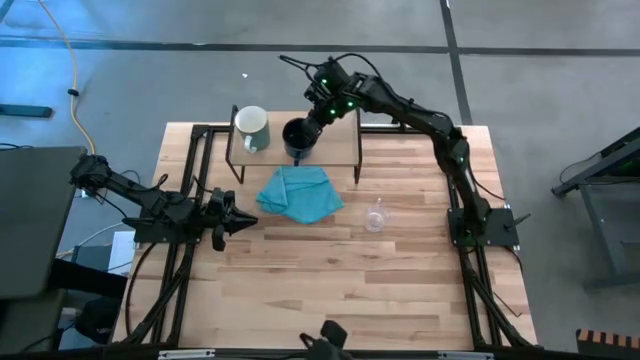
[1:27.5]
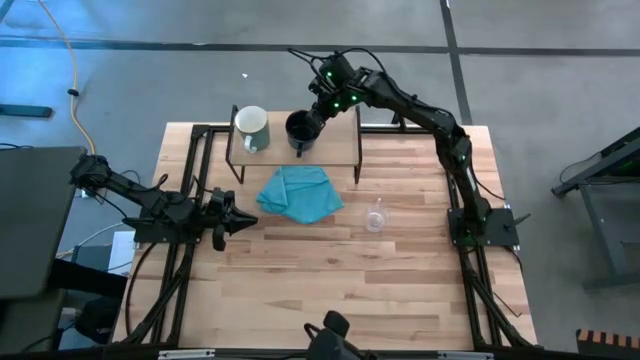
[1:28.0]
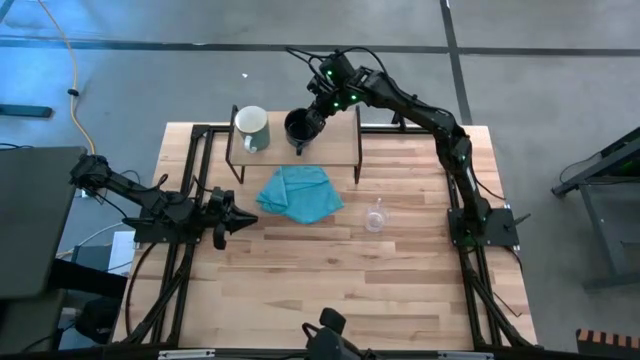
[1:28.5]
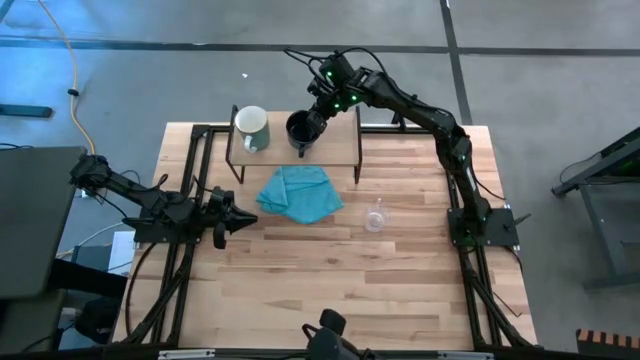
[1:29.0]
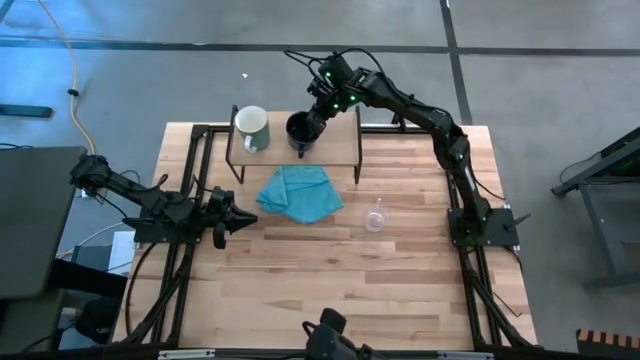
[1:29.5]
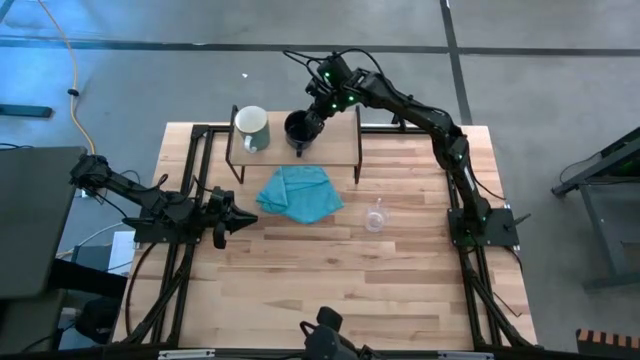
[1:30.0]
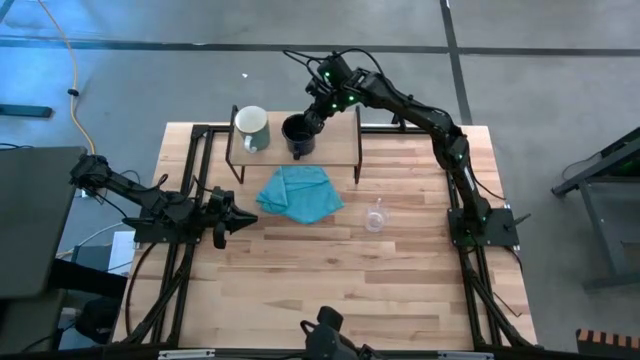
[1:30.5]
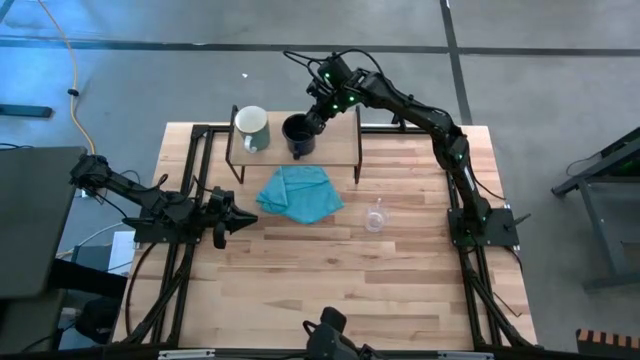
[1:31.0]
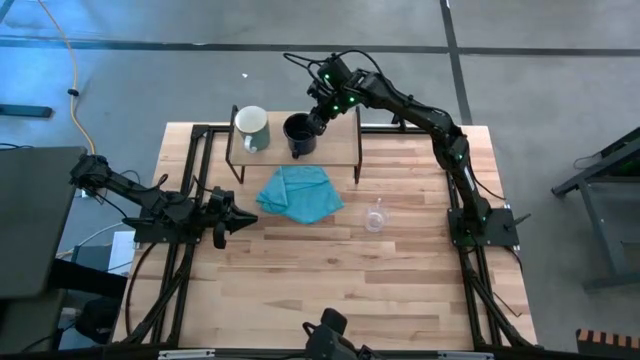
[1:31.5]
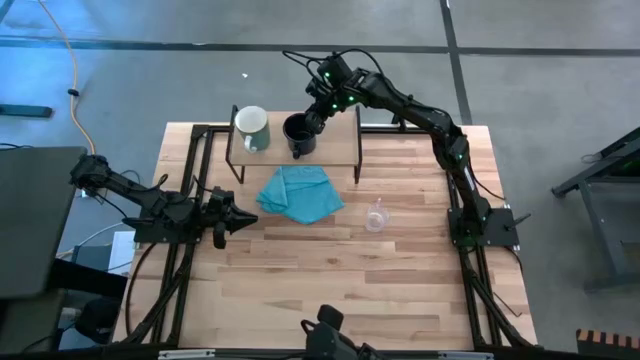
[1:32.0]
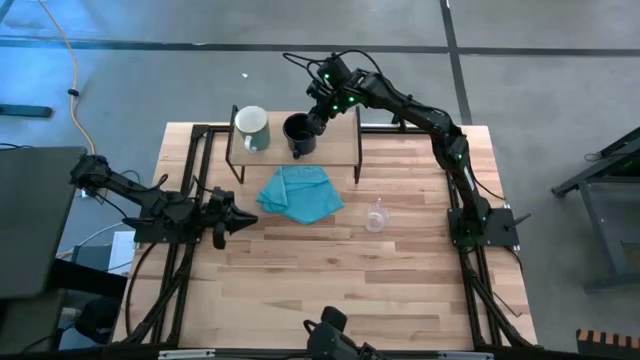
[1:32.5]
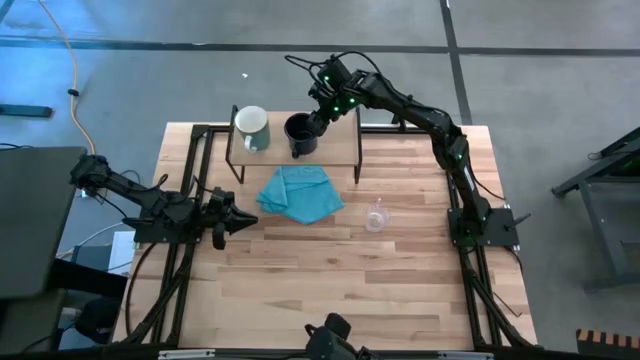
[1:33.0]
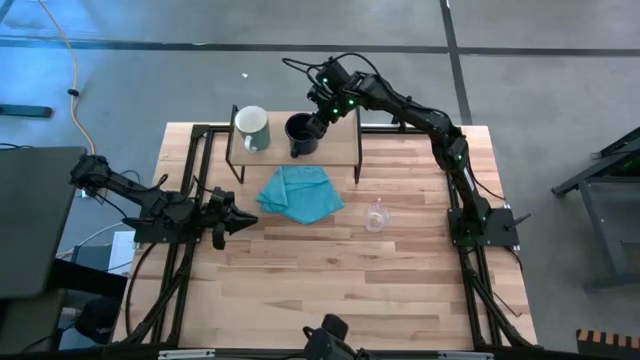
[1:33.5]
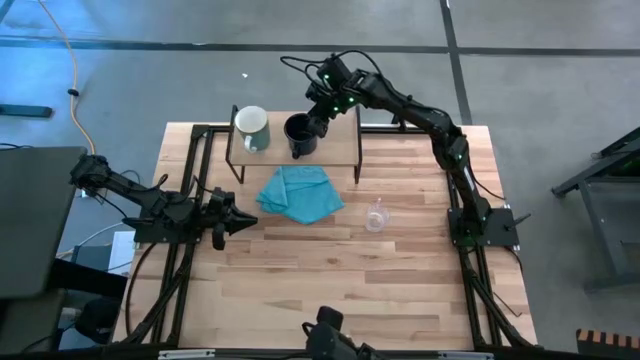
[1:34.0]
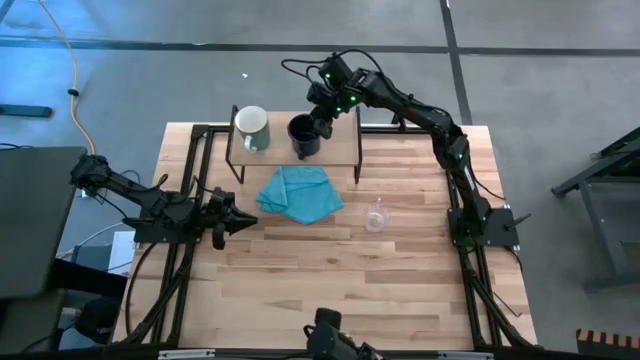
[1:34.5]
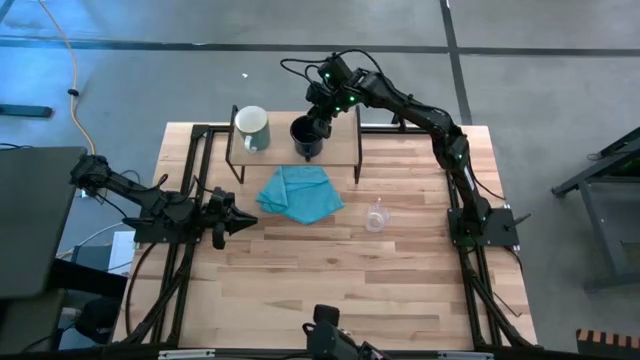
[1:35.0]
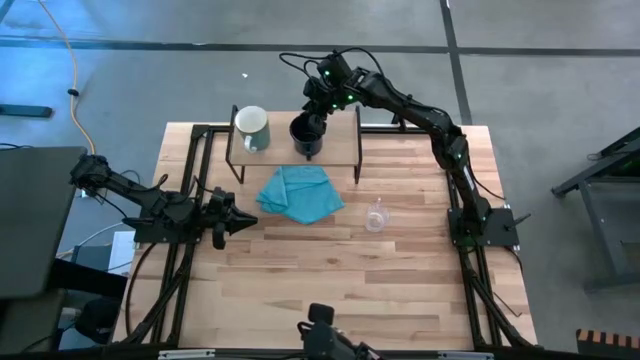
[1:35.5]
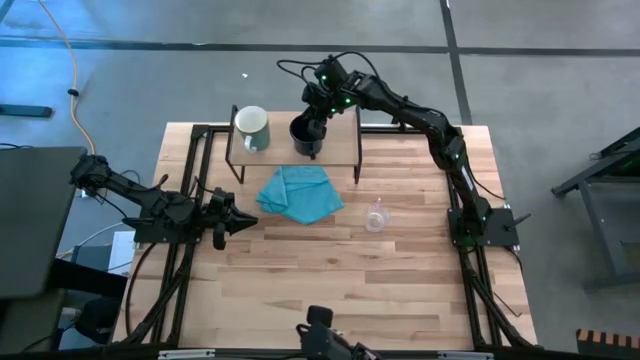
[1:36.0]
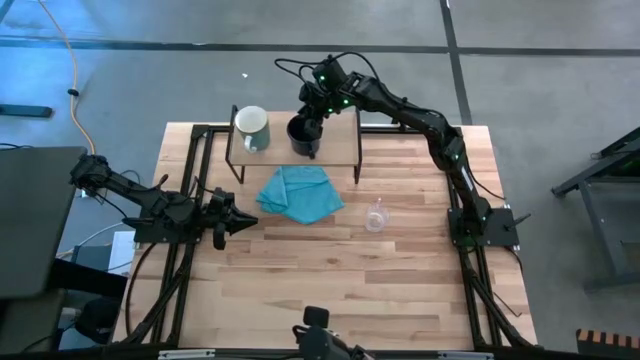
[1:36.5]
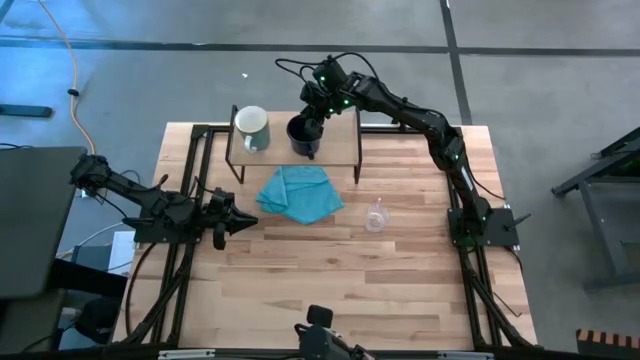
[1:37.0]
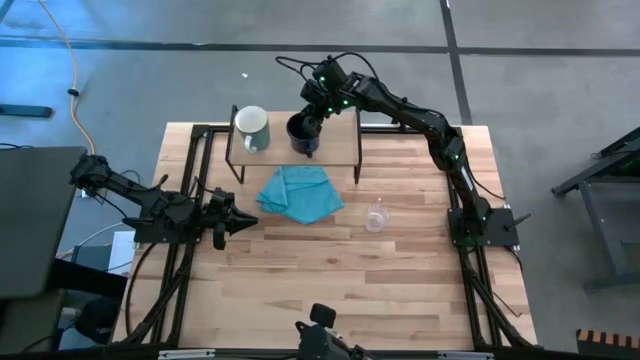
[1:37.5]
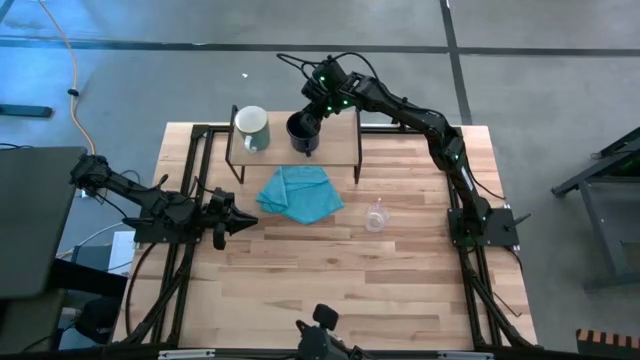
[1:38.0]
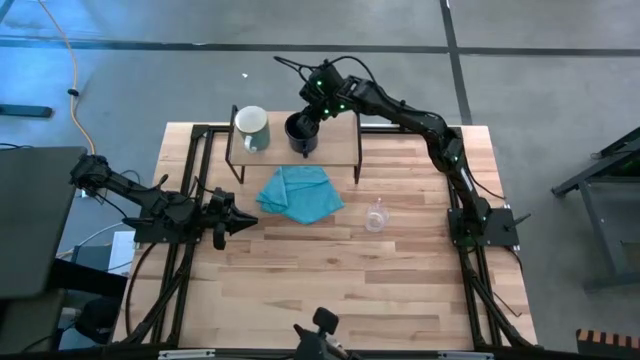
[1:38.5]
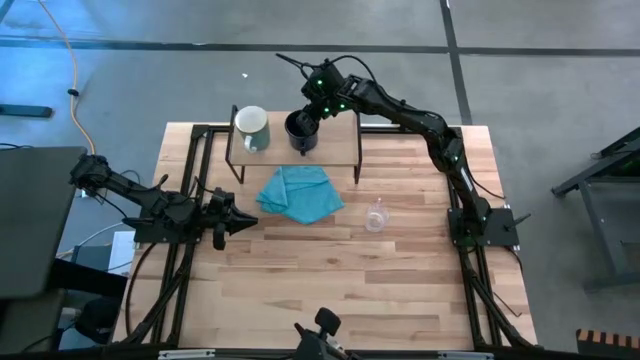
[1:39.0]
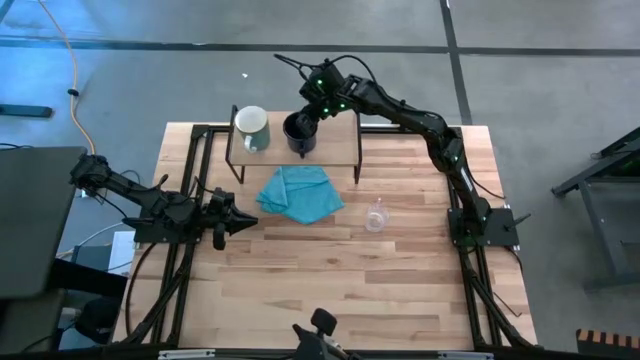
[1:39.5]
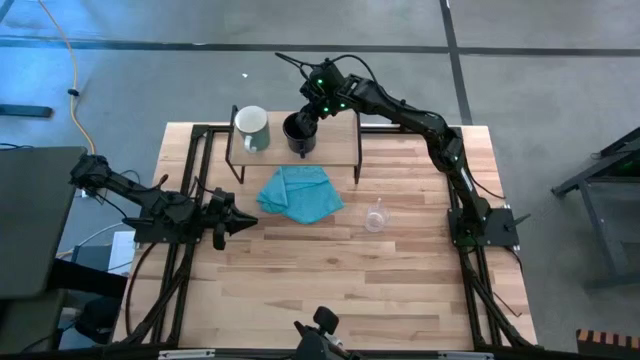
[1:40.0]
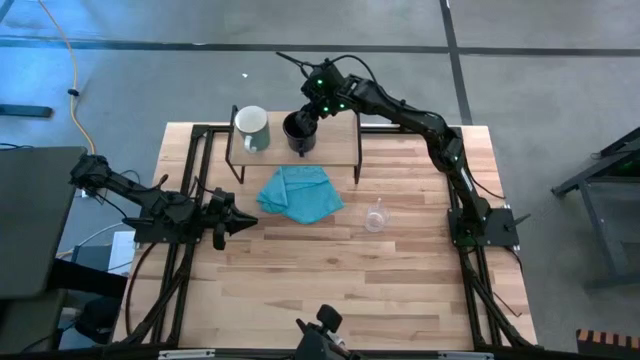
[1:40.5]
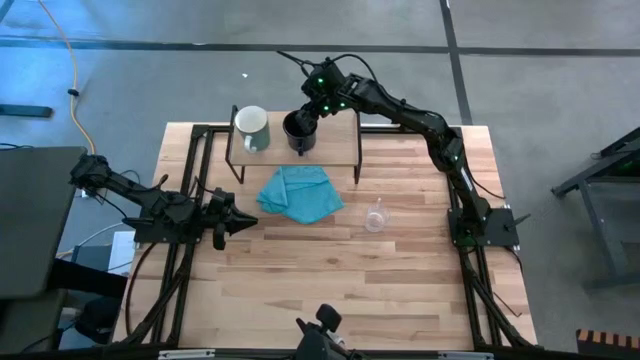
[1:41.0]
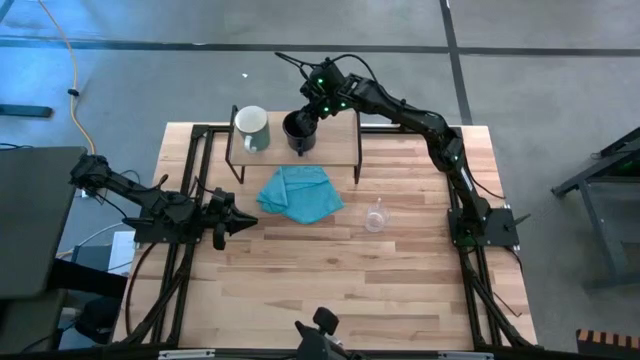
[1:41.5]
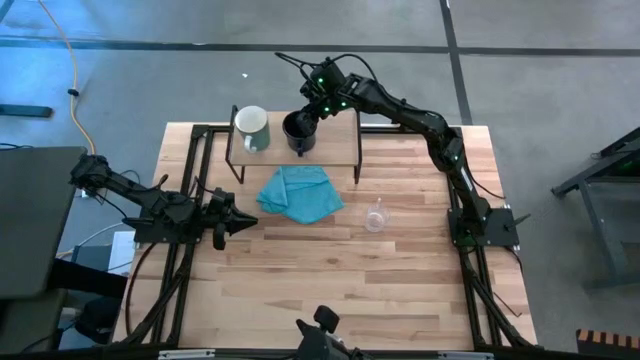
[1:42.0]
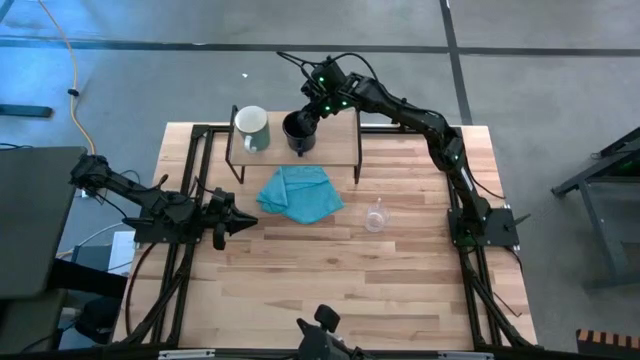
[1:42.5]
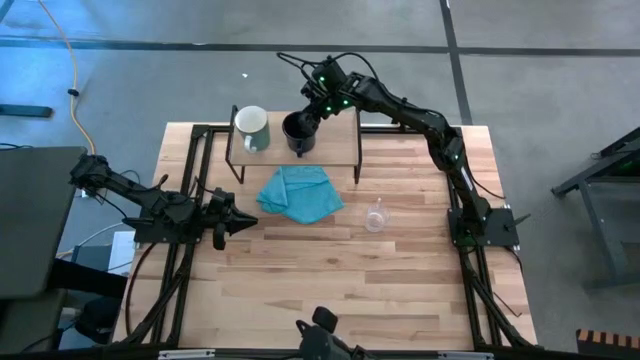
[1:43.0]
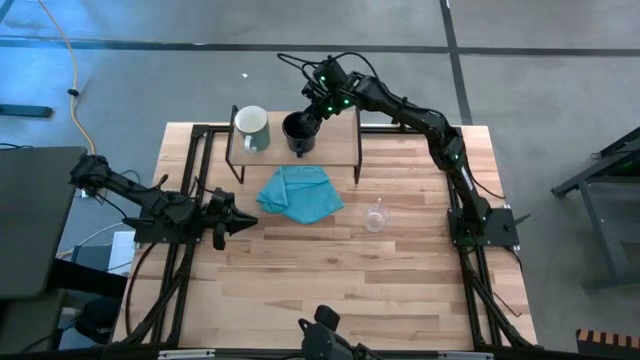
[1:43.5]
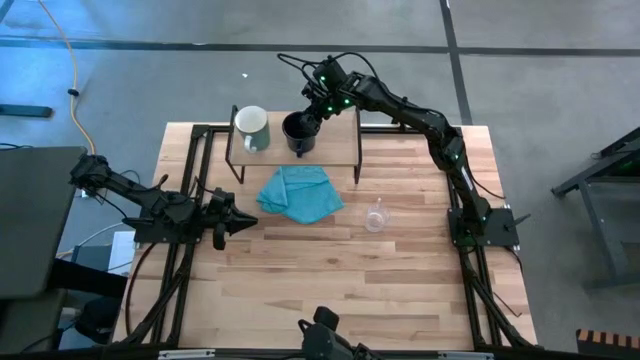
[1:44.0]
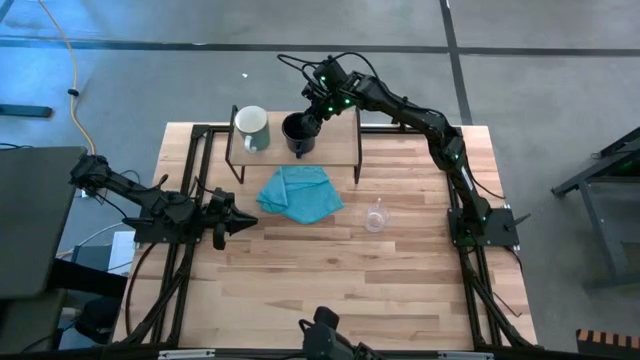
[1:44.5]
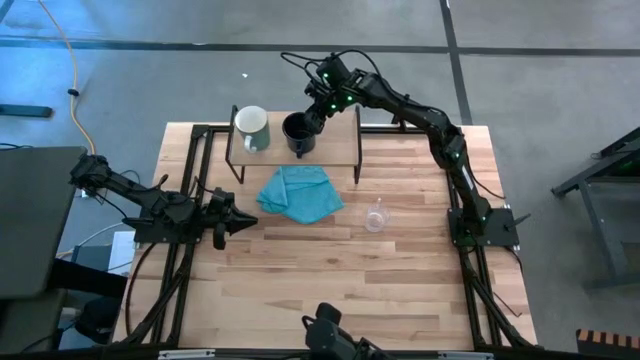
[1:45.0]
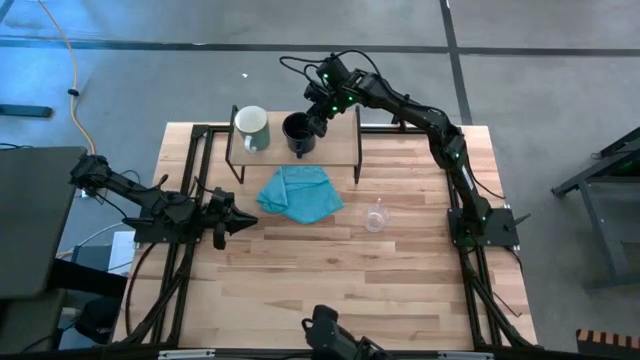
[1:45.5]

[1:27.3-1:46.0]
Task: Stack small to large cups/mugs on shelf
Put the blue mug on the shelf

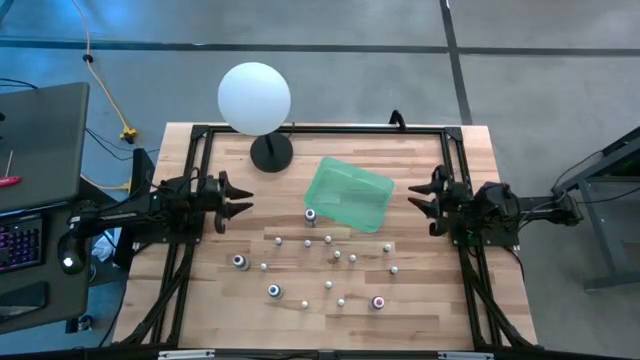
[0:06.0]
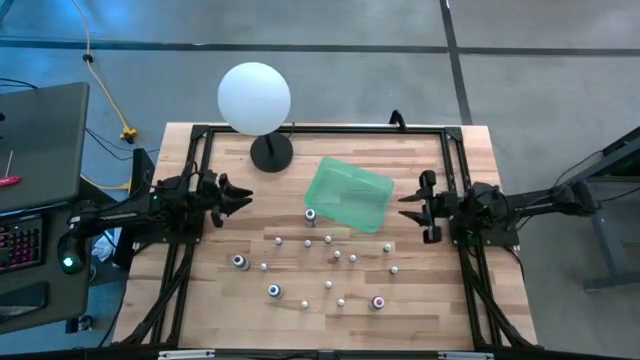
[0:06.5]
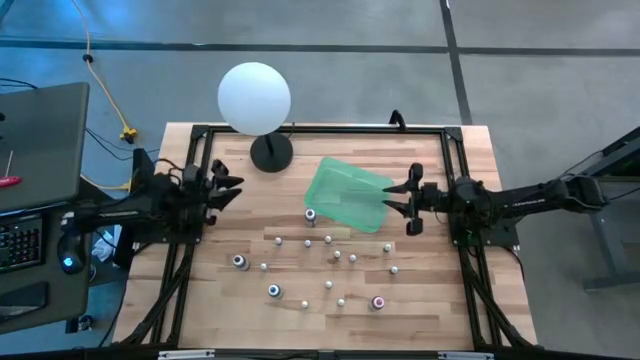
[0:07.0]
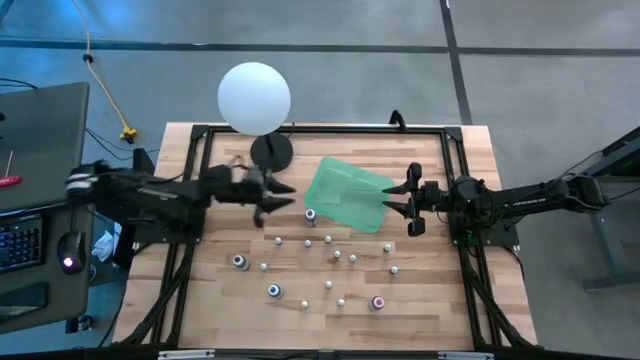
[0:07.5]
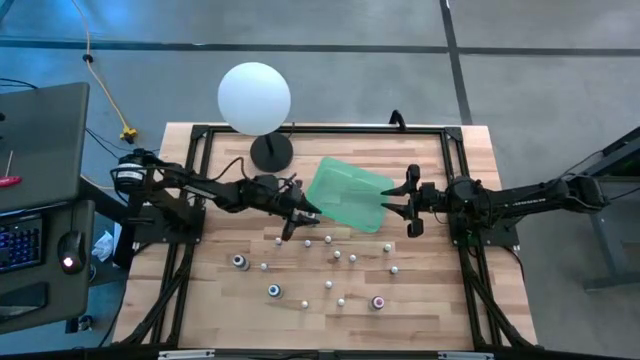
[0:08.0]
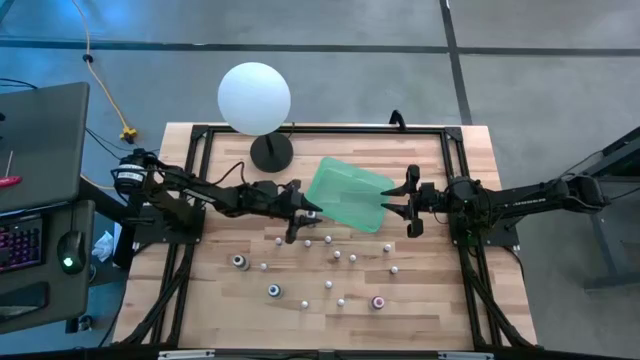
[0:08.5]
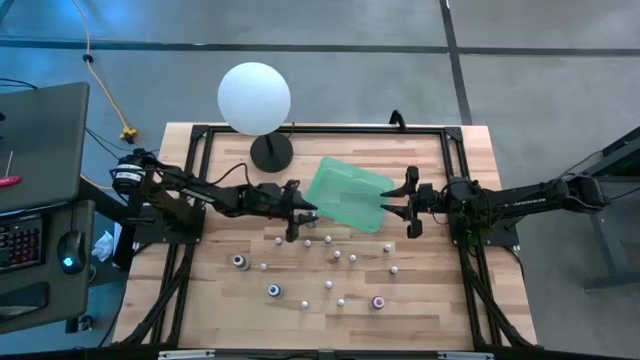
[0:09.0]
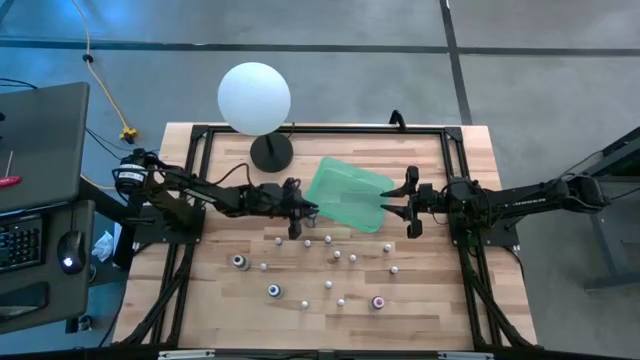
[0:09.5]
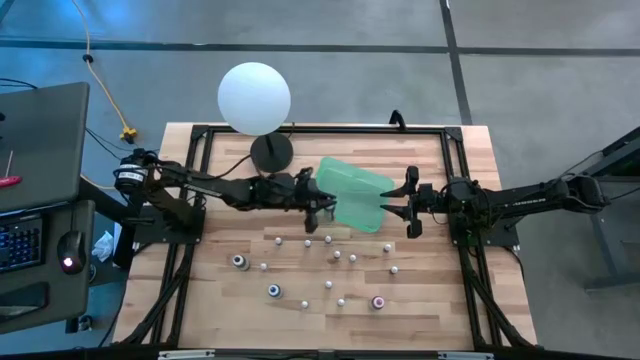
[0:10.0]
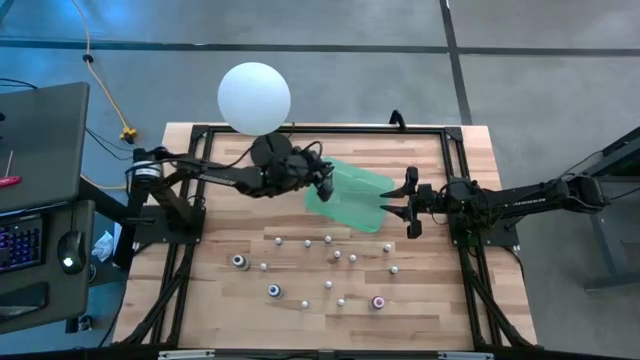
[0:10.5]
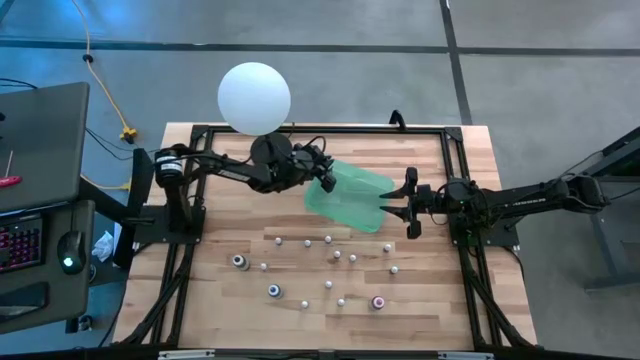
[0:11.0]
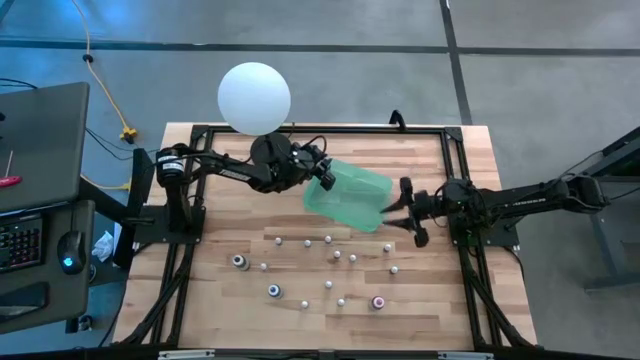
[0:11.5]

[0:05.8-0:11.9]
Task: Pick & Place food coloring
Put the large purple food coloring bottle into the green container
